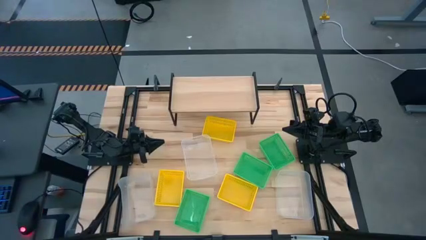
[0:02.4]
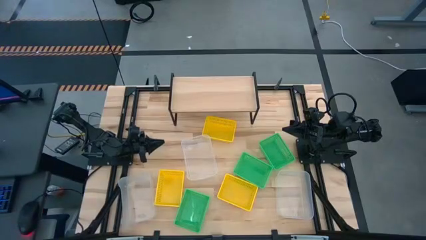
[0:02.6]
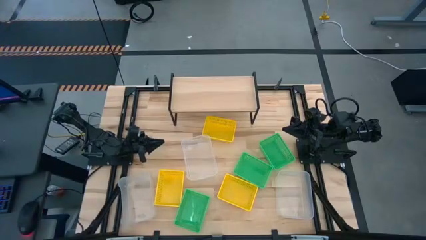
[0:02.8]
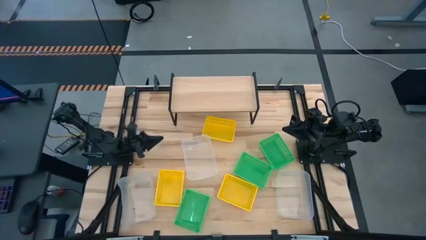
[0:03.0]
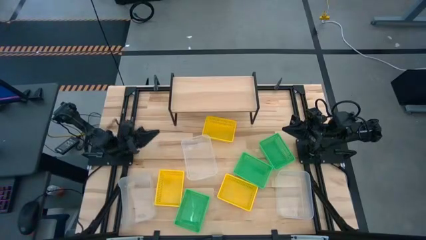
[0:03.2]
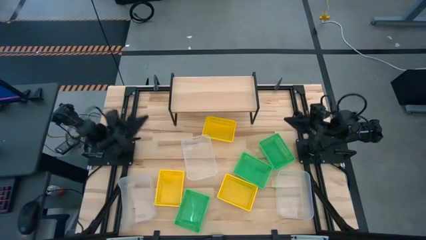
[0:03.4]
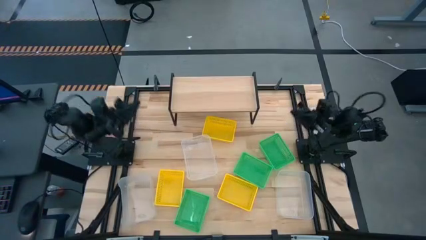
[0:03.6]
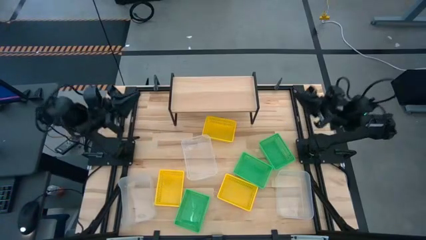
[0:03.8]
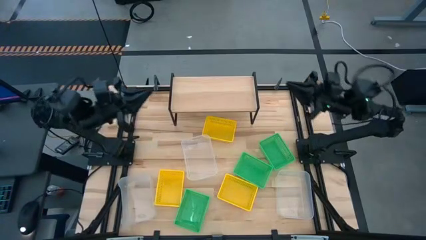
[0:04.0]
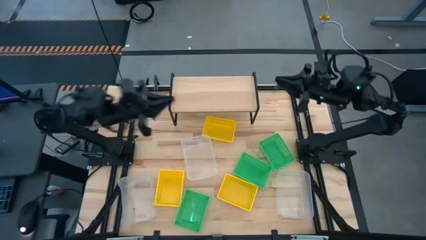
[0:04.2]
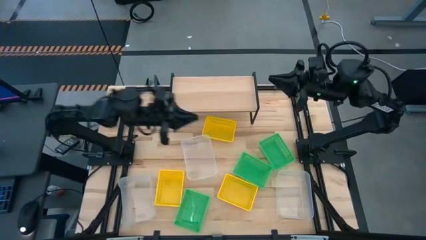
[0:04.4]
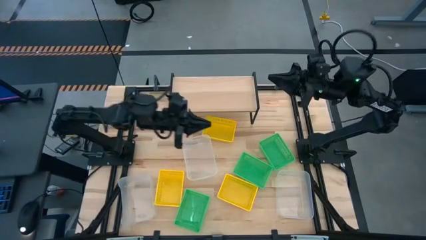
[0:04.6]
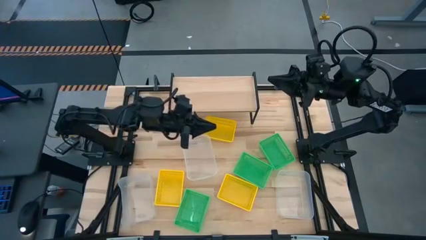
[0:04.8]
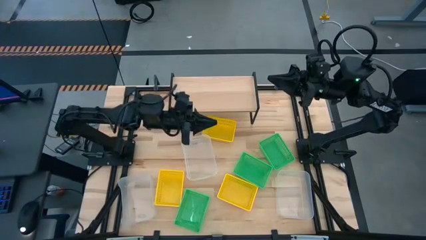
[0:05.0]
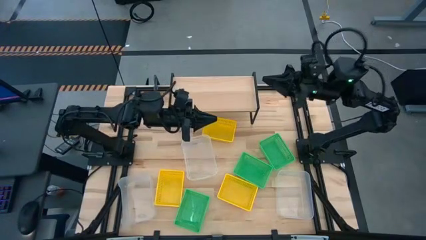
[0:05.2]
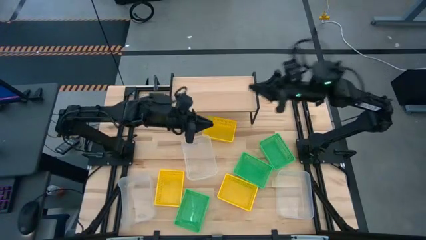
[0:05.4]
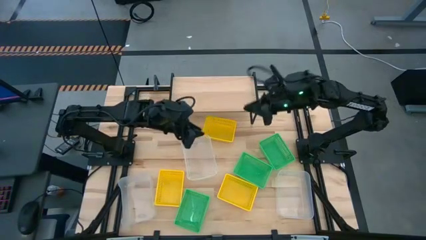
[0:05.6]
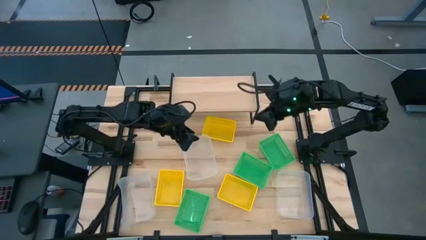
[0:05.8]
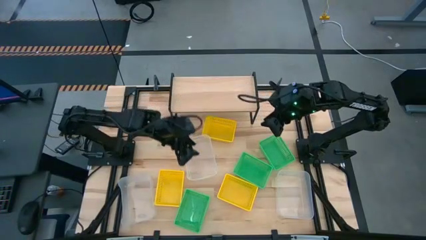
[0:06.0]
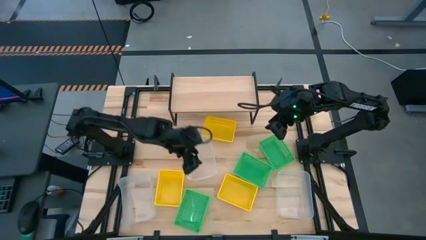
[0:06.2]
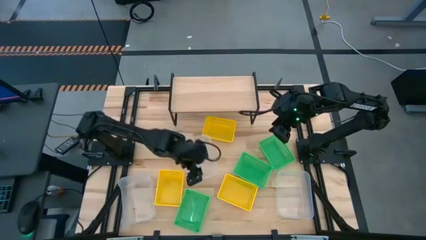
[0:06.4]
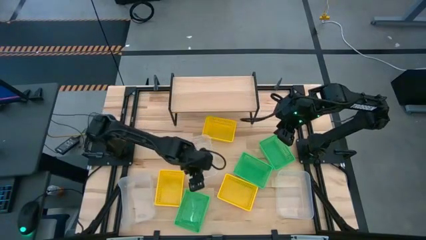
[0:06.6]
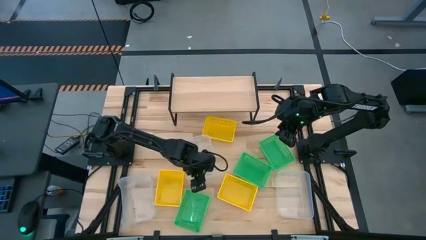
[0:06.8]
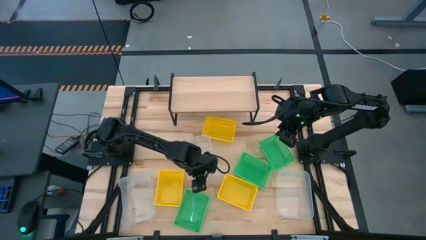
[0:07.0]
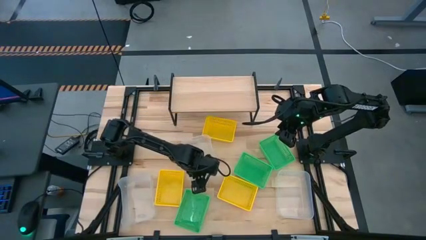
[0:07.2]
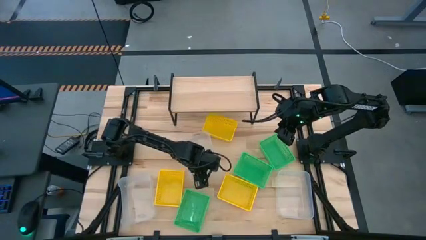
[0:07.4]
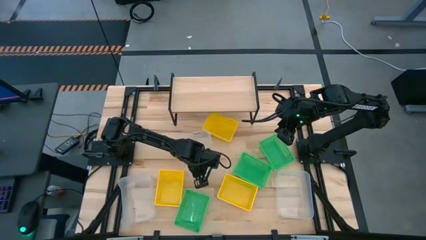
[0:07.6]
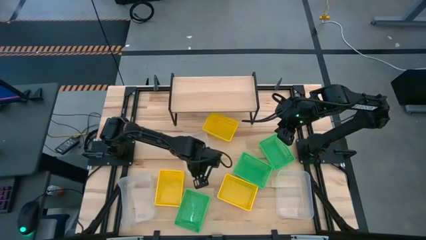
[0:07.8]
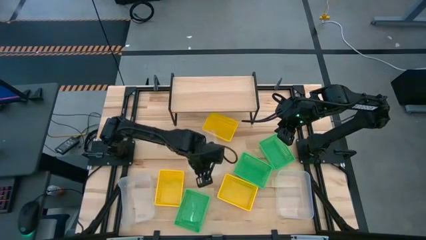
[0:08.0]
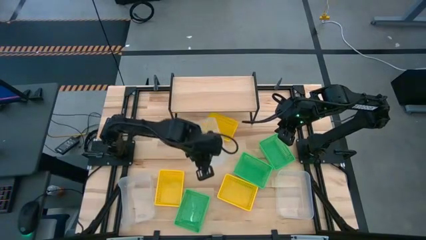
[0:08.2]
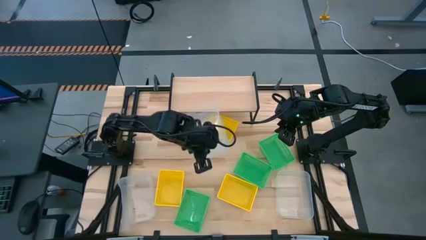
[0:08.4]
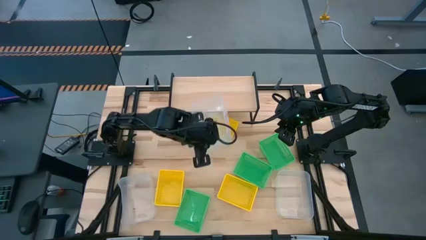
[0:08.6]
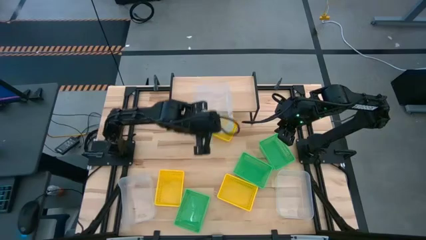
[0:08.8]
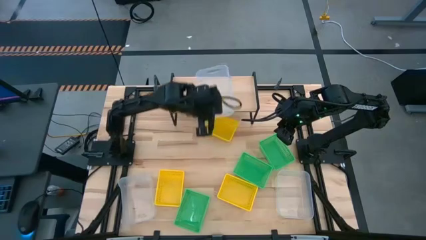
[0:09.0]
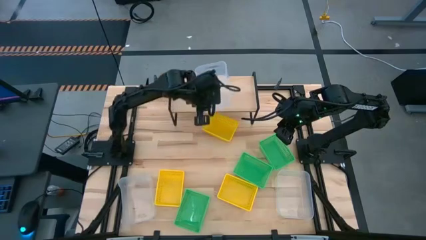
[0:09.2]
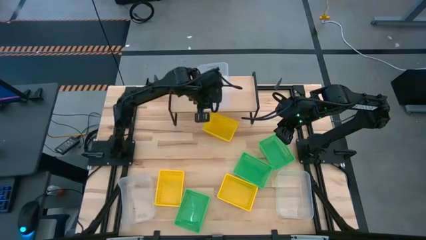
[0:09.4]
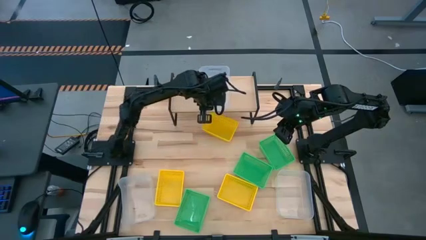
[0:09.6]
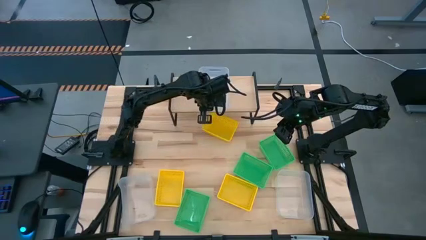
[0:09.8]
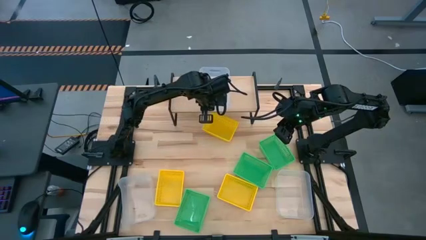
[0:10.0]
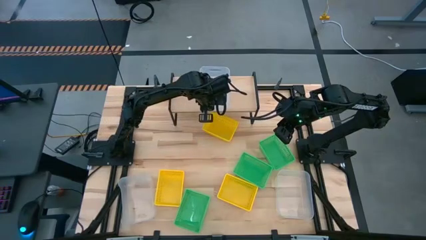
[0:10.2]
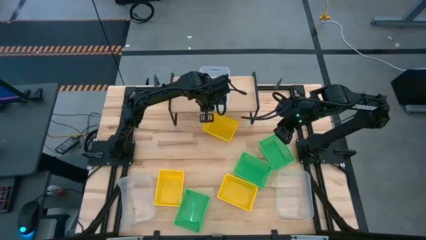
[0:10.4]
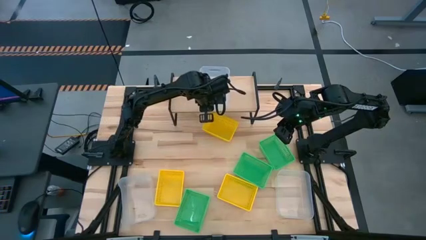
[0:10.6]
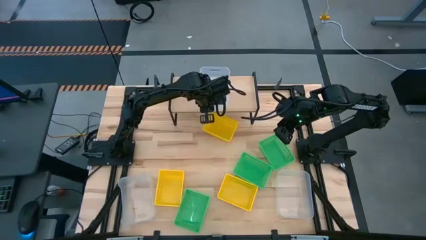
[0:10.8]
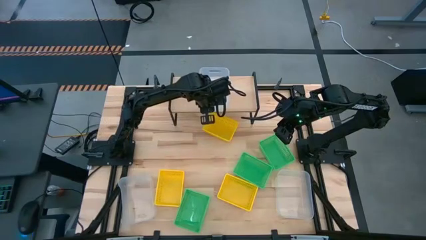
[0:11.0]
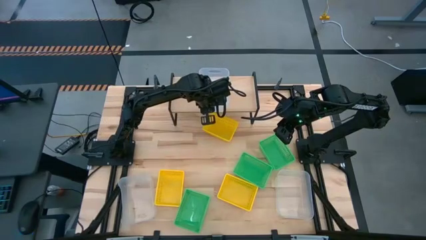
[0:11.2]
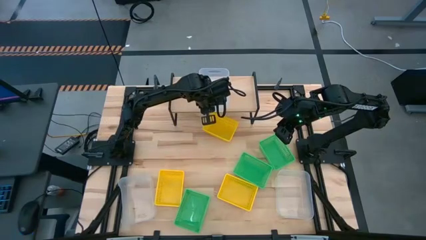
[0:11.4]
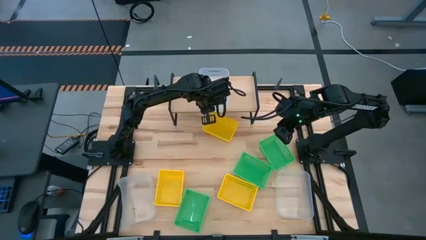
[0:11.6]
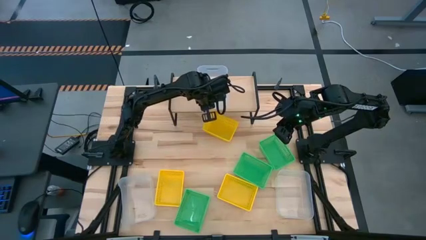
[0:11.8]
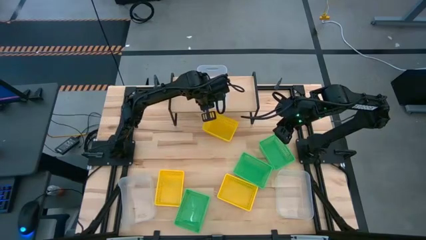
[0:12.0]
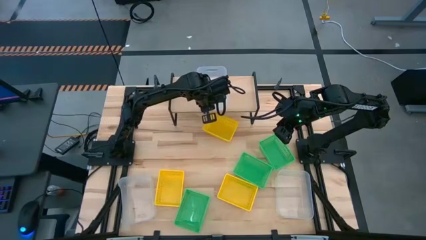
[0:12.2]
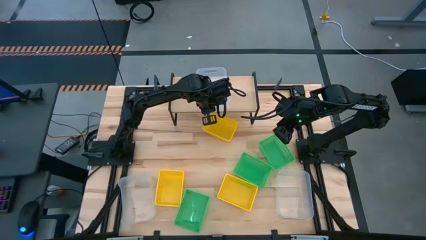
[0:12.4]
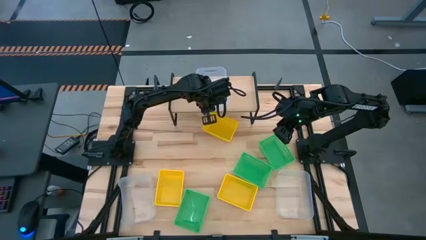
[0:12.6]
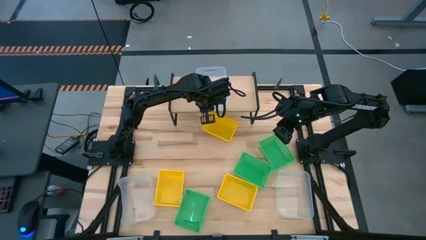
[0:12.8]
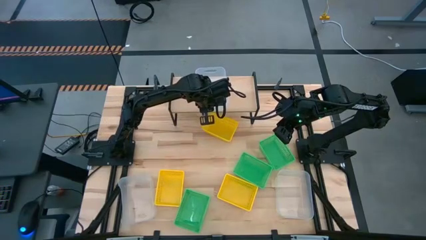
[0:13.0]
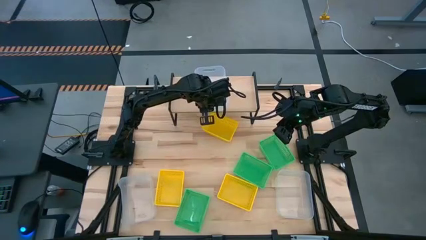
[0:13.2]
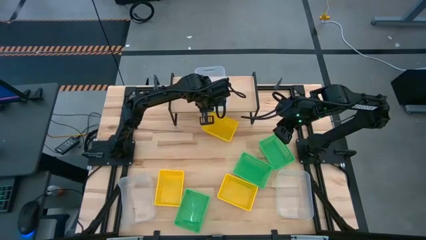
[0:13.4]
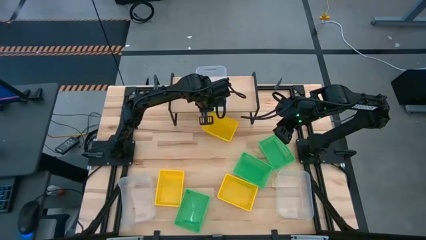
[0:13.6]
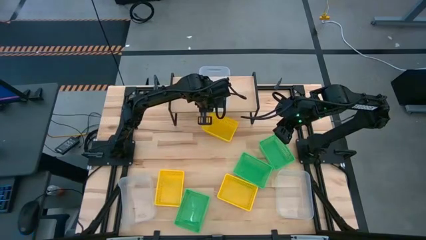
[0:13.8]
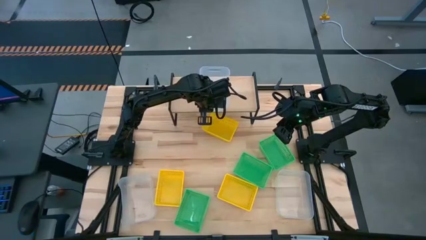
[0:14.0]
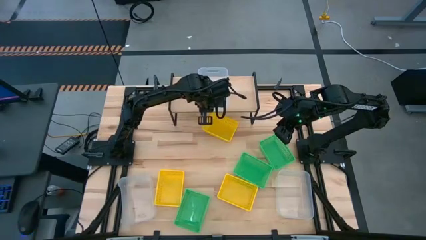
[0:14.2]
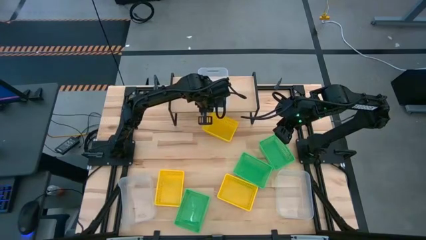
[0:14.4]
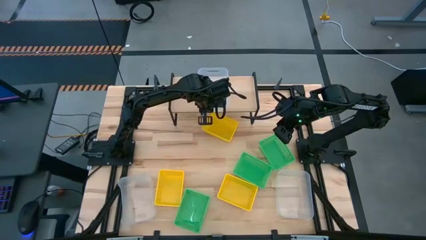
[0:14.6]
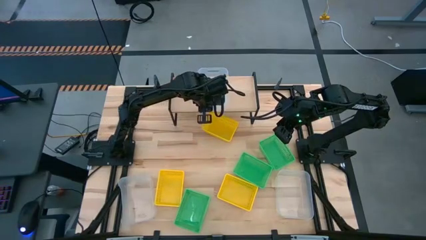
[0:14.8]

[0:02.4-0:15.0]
Task: Stack baskets on shelf by color
Put the middle transparent bin on the shelf
